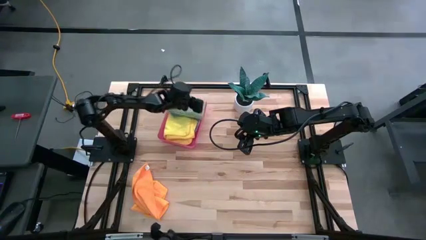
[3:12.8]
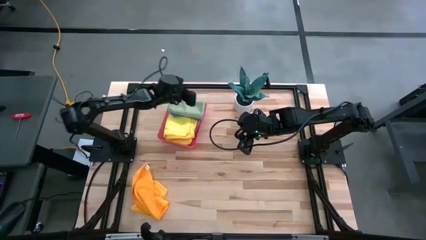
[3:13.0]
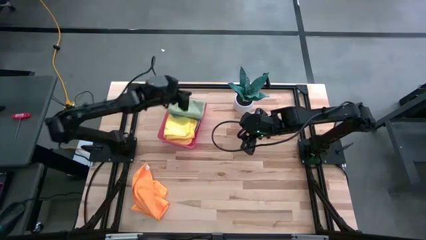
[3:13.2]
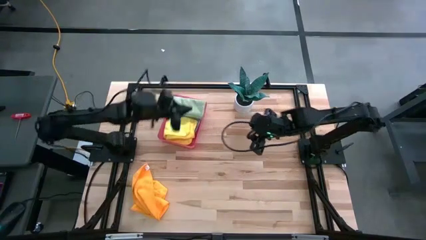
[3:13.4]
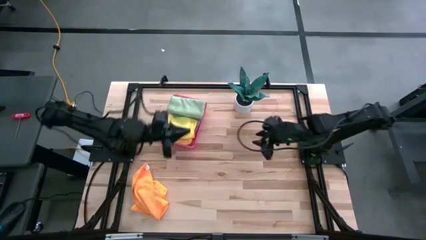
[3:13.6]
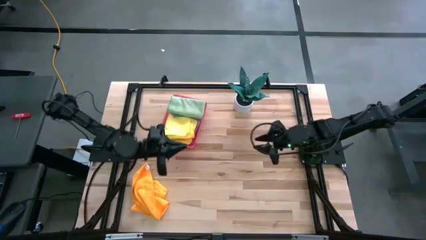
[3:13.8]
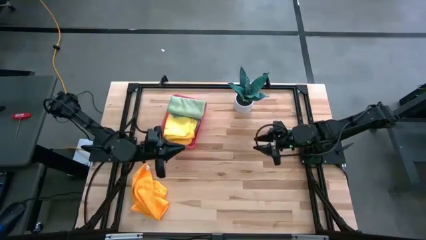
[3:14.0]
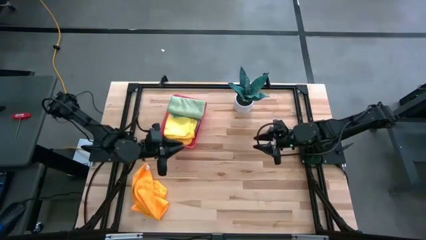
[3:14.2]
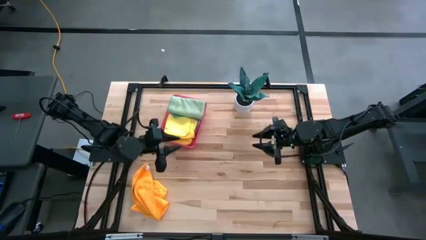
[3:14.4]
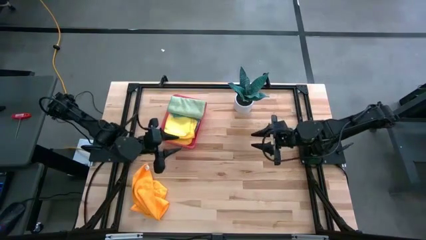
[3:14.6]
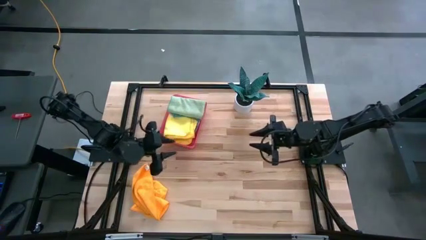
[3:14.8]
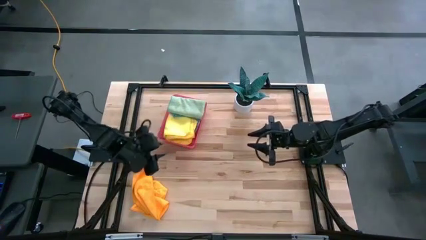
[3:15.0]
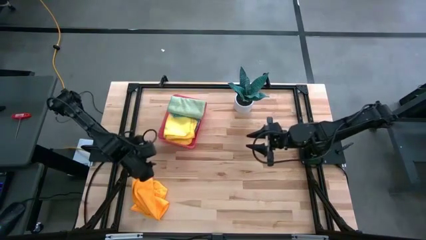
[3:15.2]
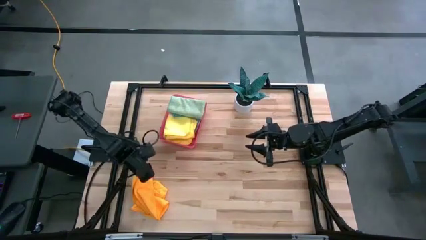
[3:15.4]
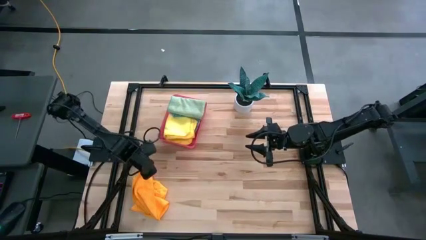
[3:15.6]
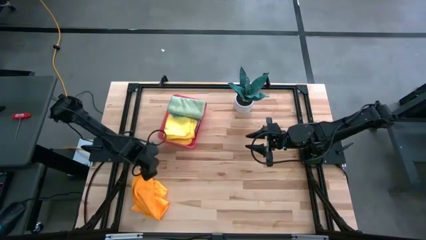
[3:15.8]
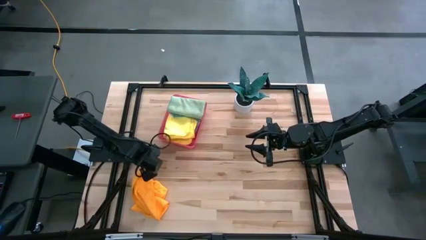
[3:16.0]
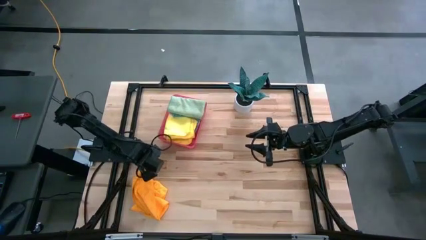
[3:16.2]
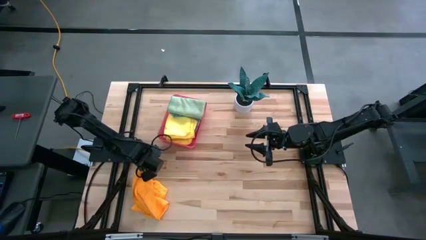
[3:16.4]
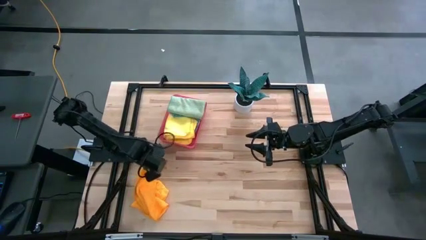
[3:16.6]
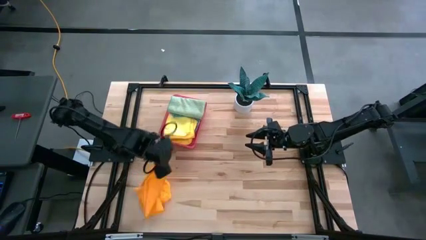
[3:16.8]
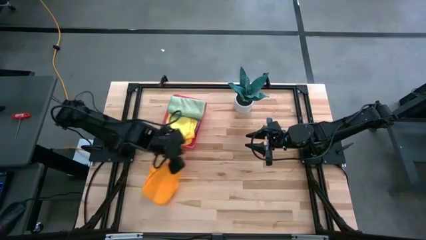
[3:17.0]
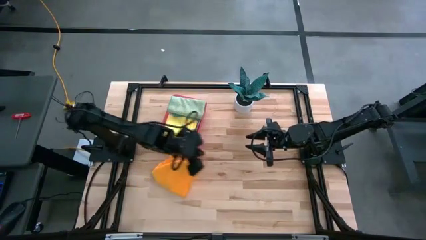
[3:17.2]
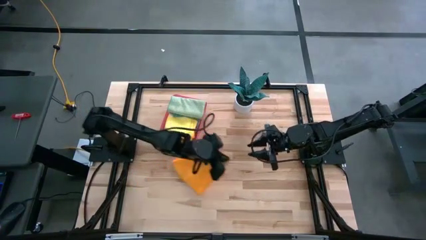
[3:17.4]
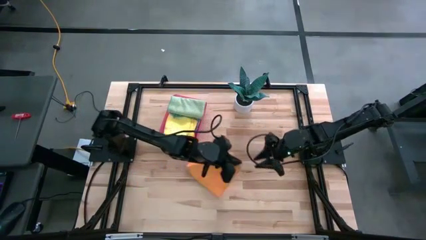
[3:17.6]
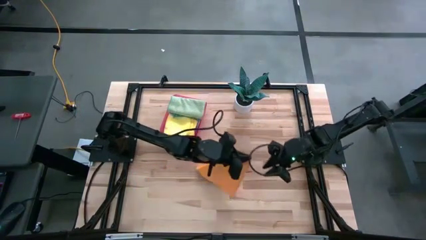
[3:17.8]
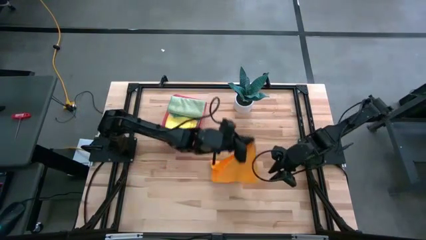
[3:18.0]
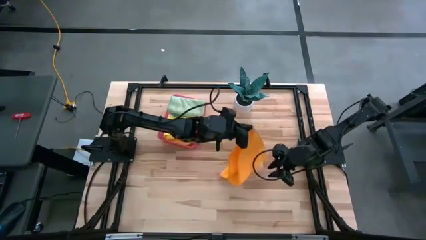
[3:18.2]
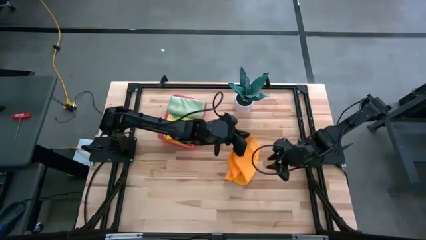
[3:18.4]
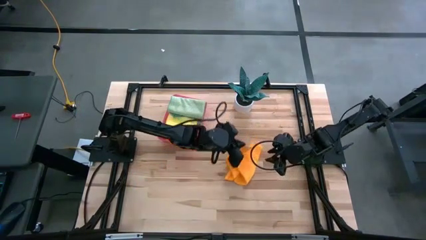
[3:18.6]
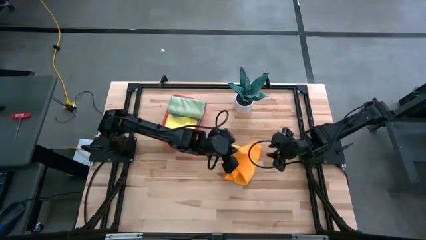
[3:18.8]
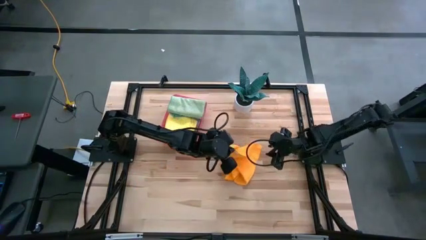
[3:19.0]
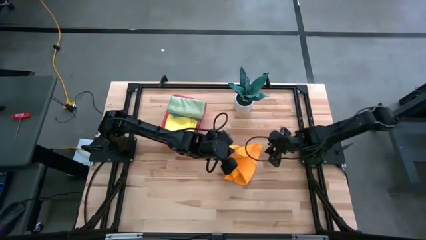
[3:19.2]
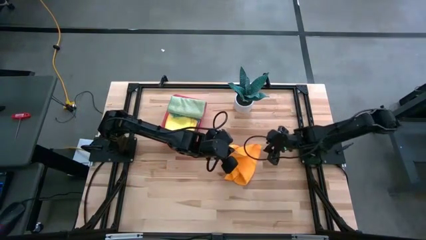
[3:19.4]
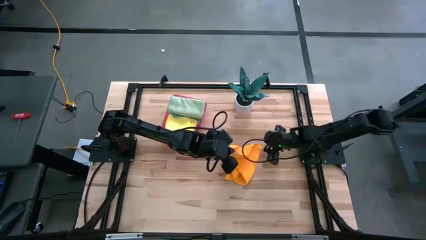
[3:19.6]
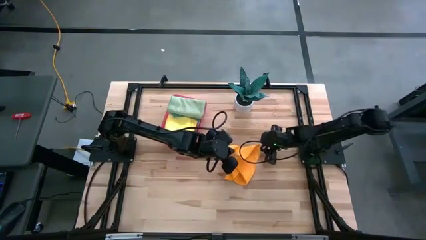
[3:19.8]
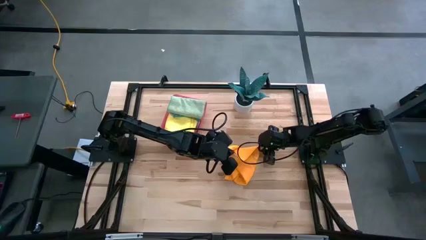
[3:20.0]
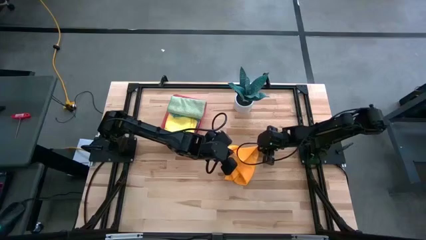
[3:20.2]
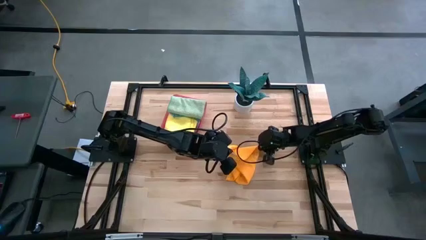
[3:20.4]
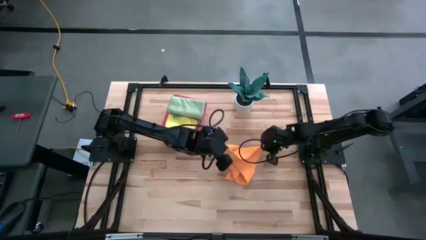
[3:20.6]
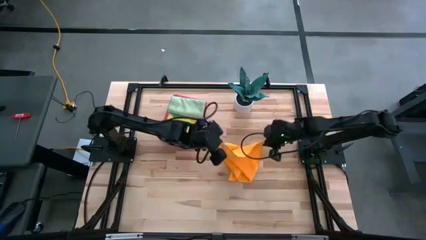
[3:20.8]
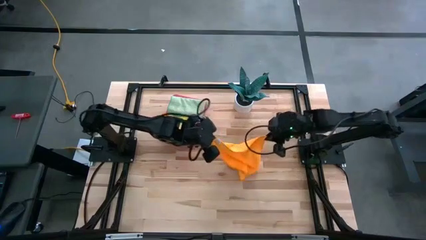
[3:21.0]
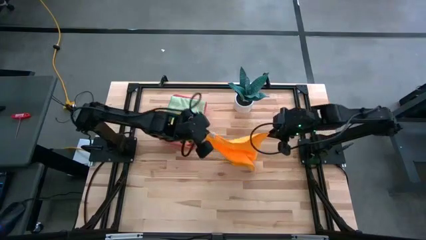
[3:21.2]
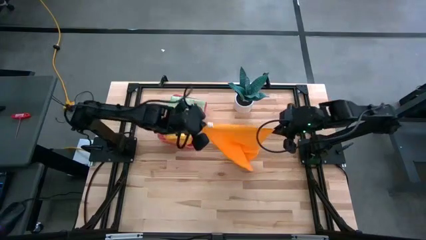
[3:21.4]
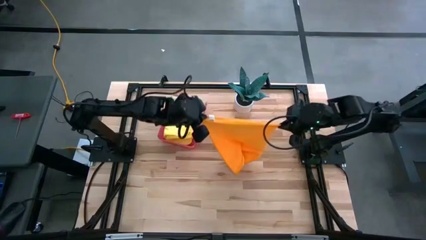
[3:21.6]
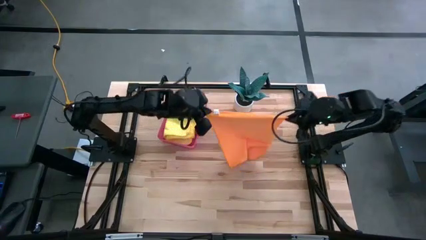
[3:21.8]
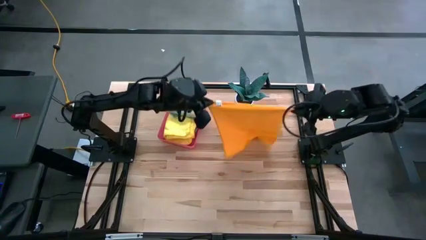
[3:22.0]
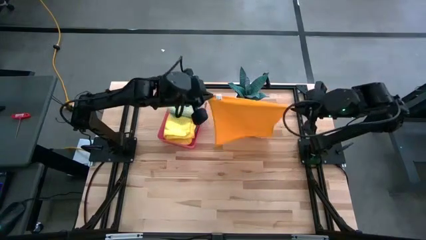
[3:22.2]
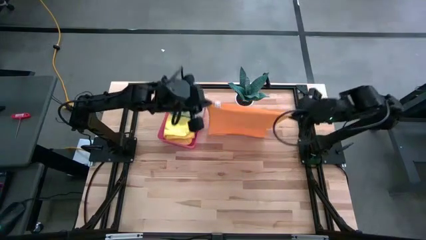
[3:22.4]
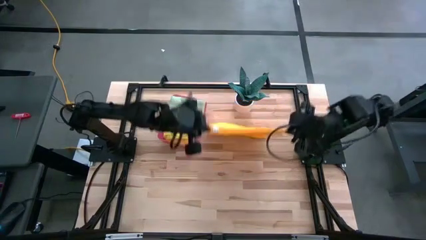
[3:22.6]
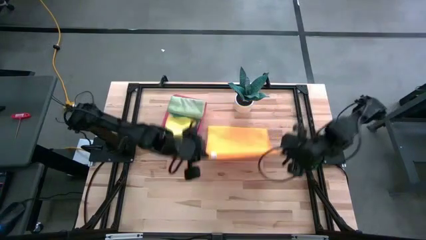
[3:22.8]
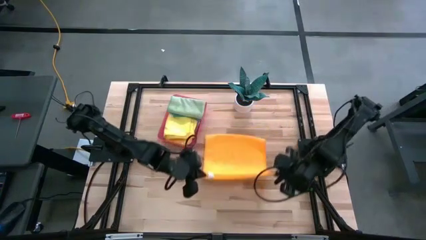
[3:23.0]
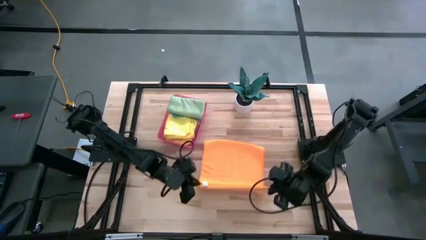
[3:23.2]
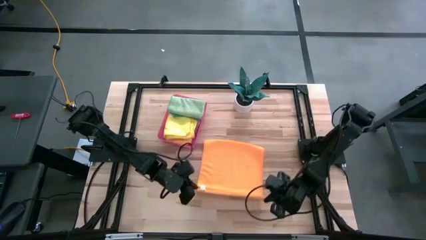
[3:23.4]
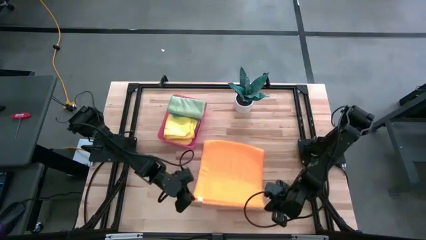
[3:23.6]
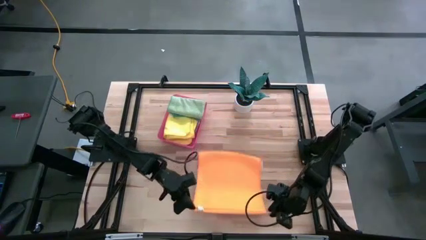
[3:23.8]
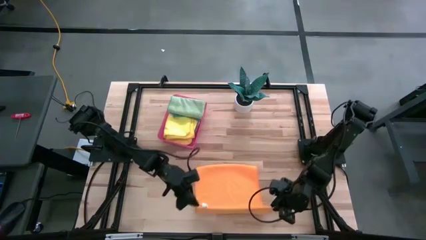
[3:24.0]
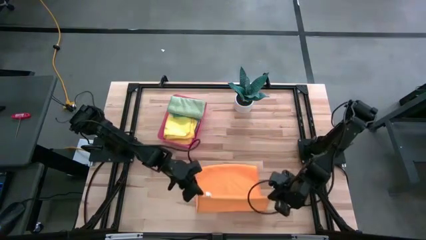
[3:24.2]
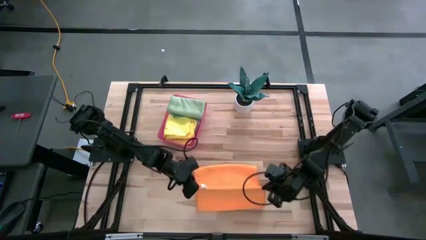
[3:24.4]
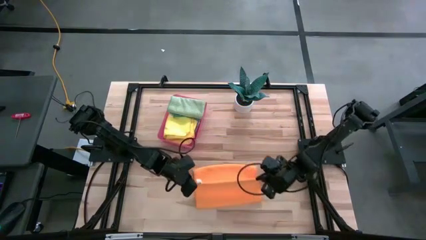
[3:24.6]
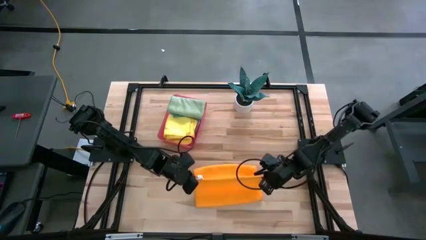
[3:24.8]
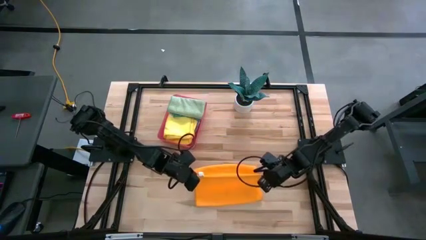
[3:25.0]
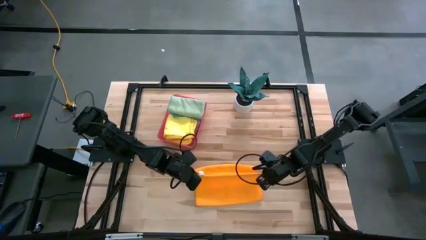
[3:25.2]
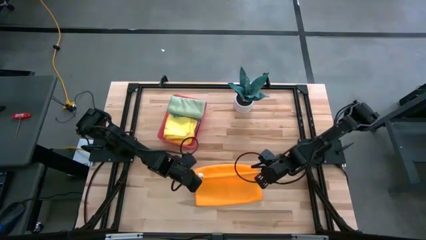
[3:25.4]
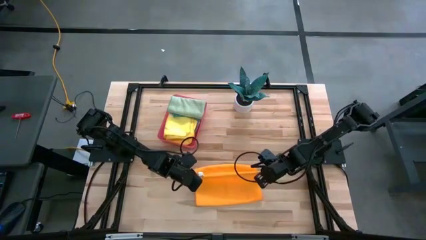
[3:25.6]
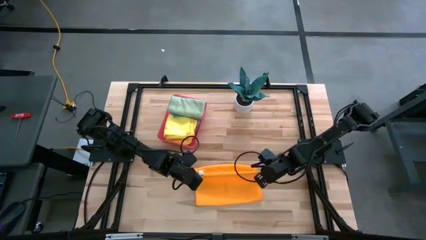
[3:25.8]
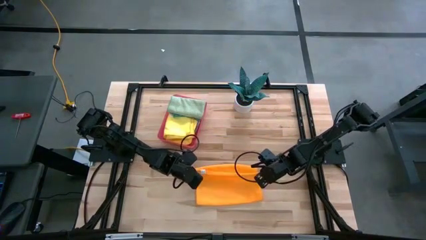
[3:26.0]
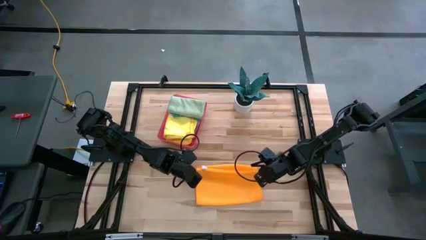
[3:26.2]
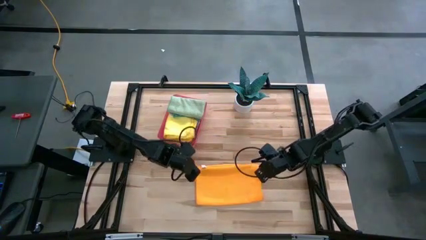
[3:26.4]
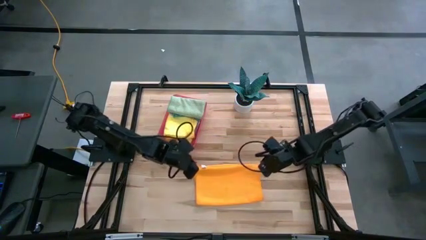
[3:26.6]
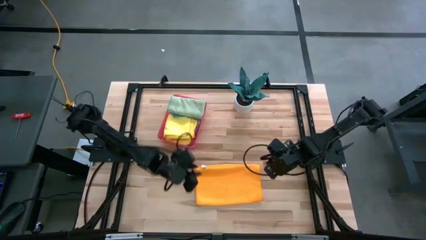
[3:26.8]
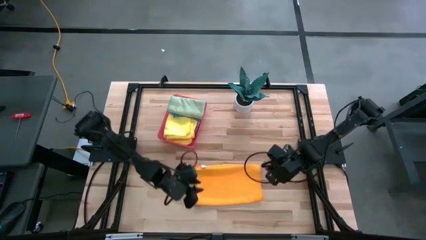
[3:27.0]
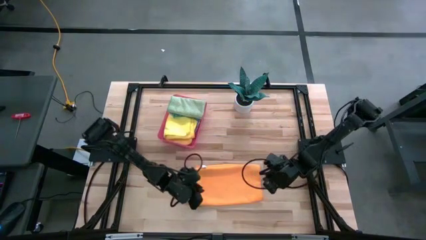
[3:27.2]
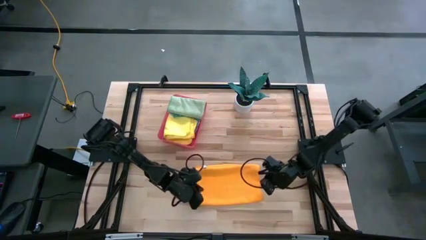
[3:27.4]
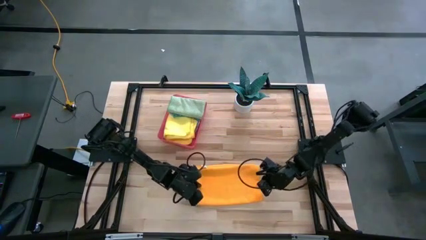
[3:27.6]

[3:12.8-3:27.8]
Task: Fold microfiber towels
Fold the orange microfiber towel

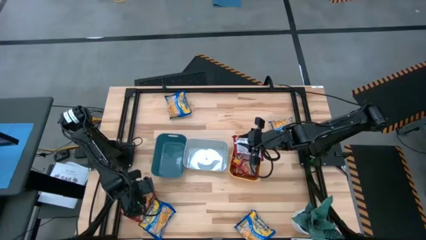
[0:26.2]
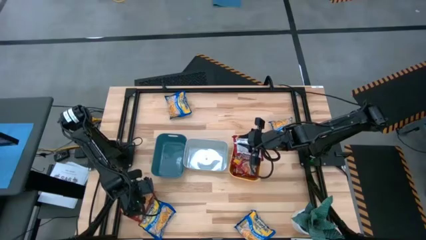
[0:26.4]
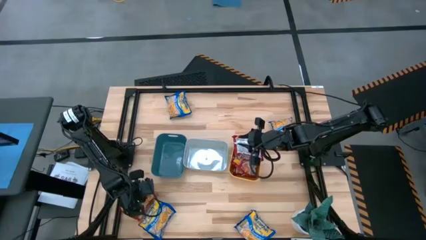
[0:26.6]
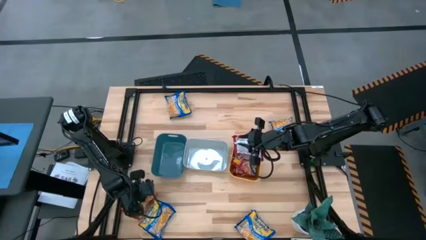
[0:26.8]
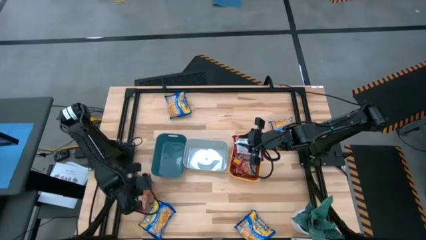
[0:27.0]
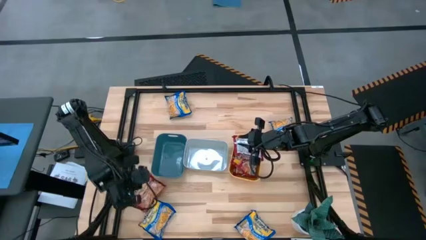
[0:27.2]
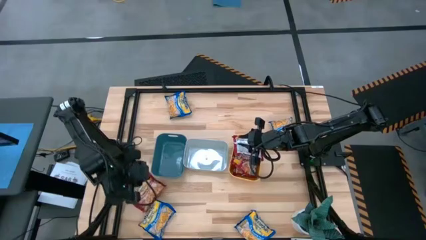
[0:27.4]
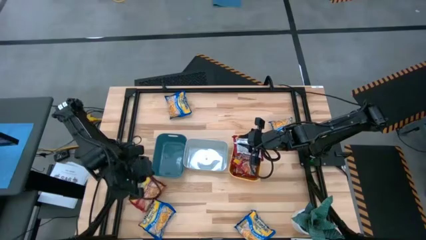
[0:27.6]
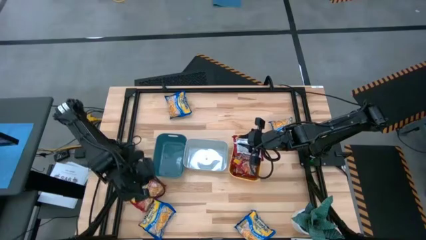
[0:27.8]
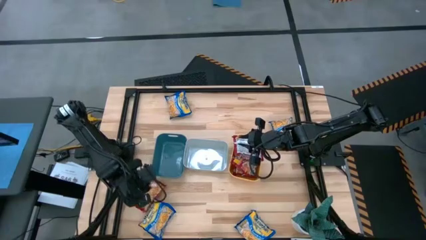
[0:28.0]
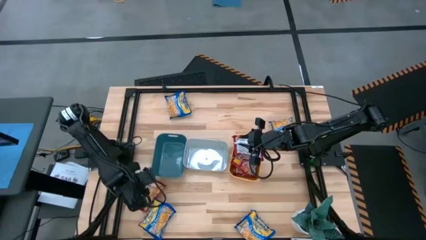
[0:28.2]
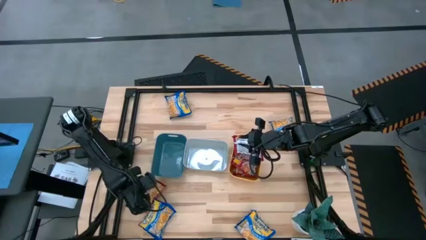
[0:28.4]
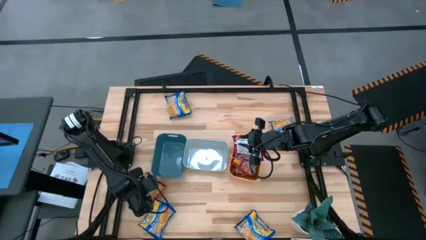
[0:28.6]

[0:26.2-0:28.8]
Task: Sort Maruchan noodles
Put the red noodle pack into the yellow bin
